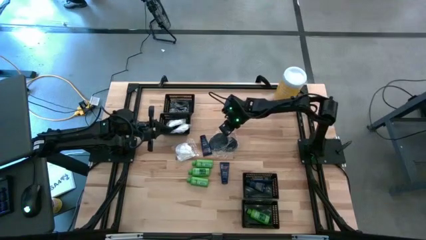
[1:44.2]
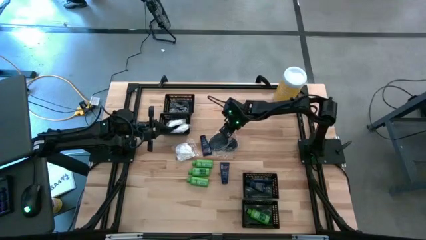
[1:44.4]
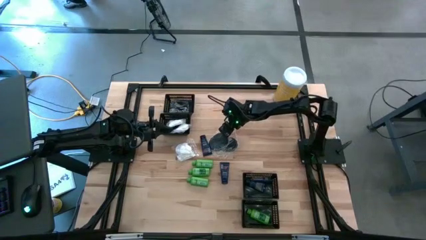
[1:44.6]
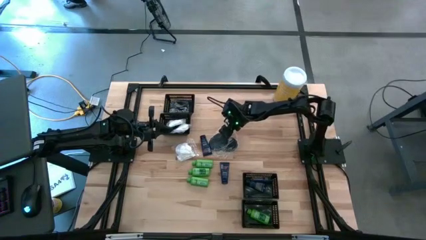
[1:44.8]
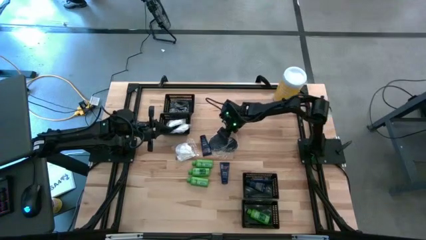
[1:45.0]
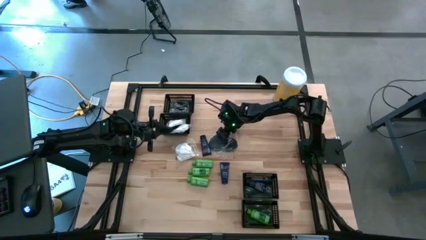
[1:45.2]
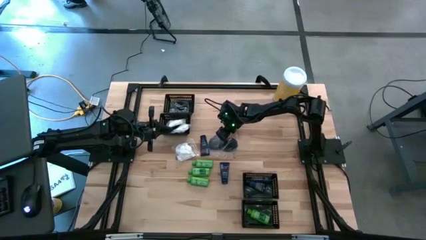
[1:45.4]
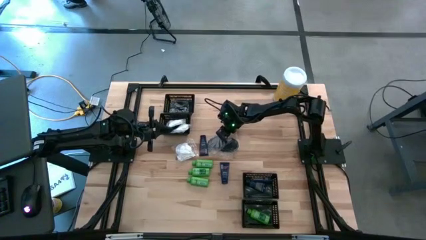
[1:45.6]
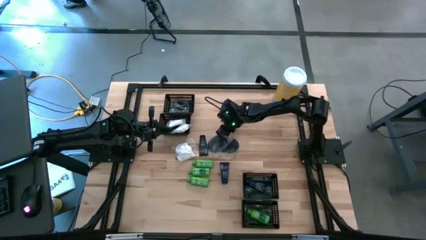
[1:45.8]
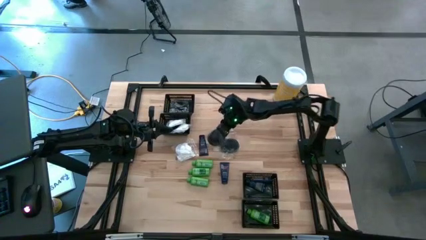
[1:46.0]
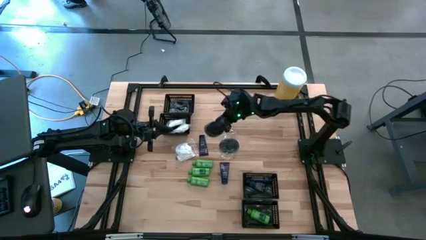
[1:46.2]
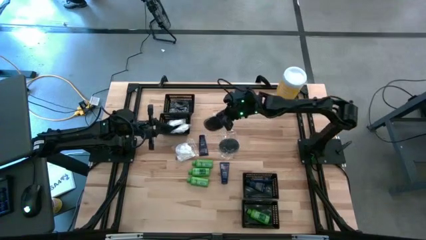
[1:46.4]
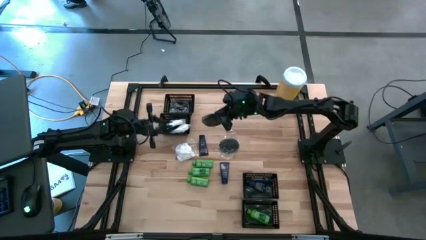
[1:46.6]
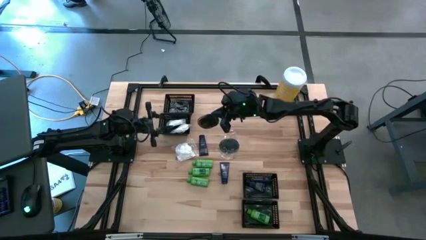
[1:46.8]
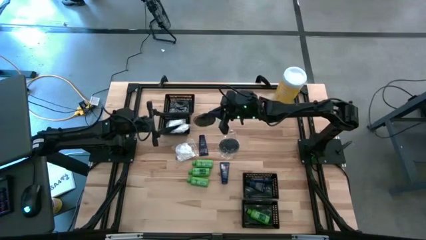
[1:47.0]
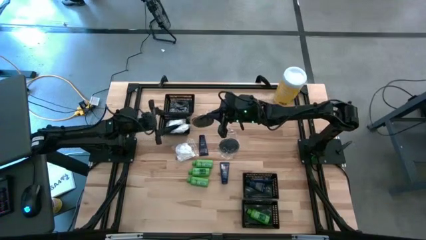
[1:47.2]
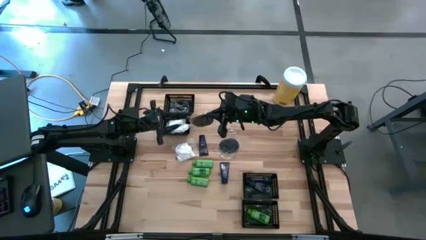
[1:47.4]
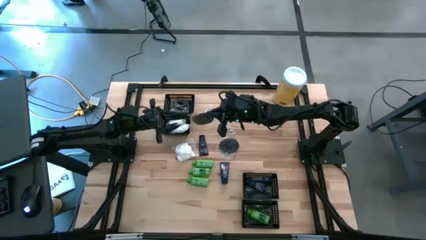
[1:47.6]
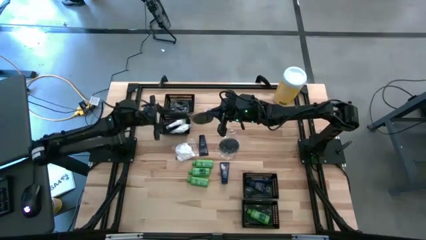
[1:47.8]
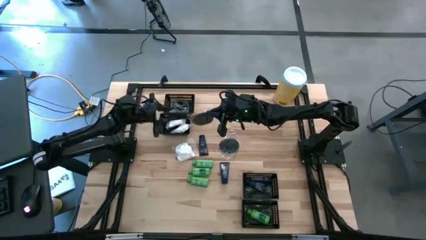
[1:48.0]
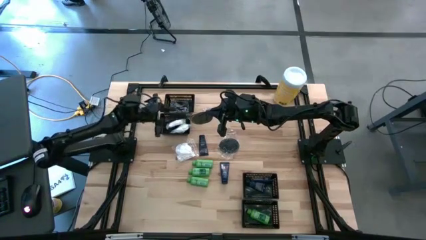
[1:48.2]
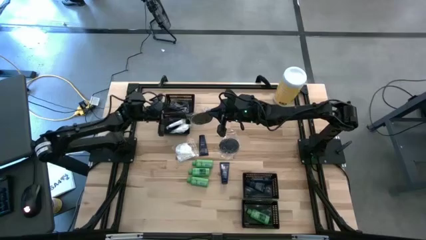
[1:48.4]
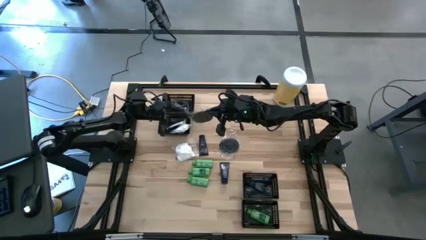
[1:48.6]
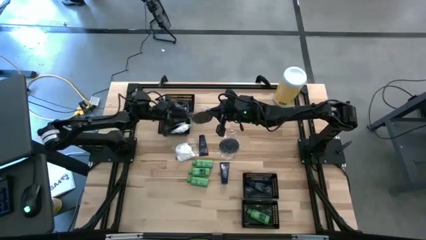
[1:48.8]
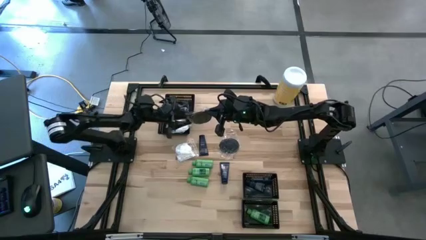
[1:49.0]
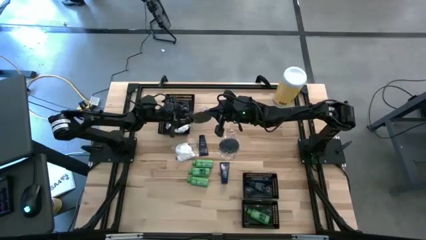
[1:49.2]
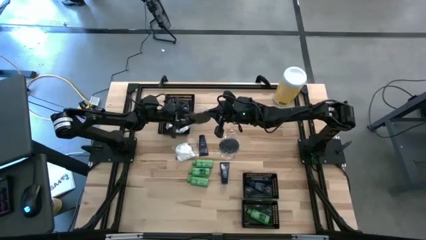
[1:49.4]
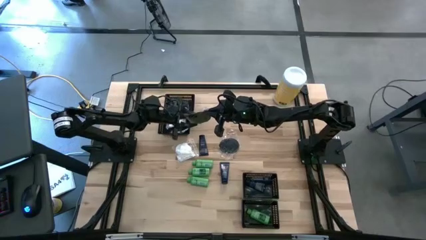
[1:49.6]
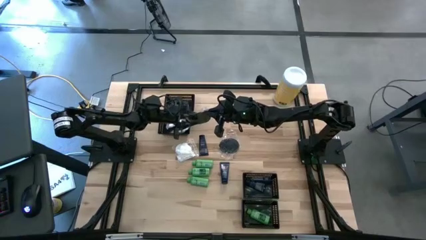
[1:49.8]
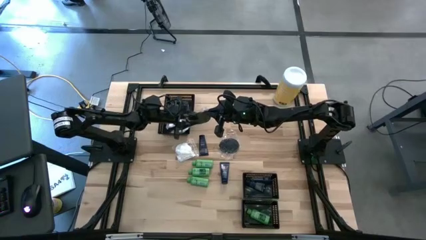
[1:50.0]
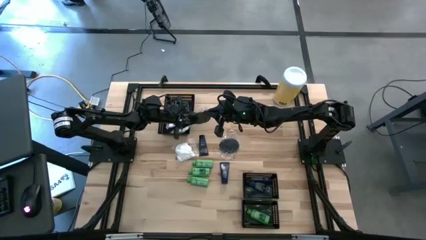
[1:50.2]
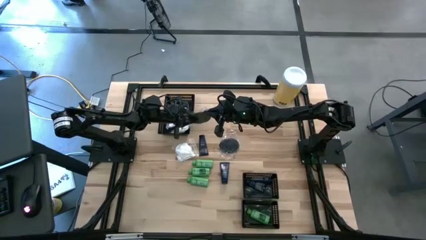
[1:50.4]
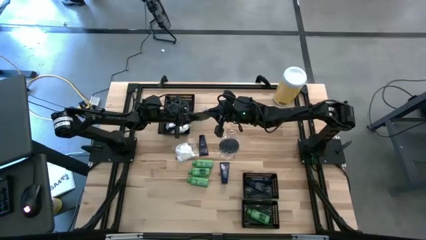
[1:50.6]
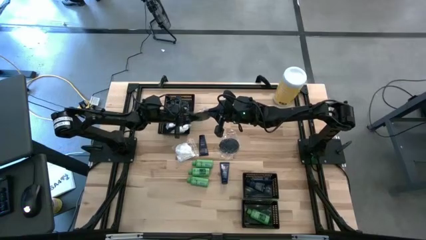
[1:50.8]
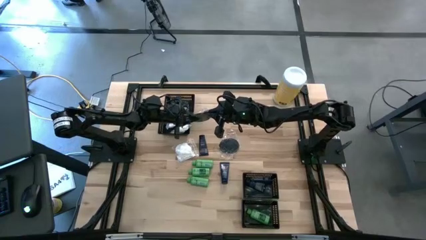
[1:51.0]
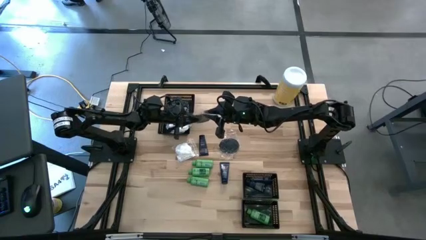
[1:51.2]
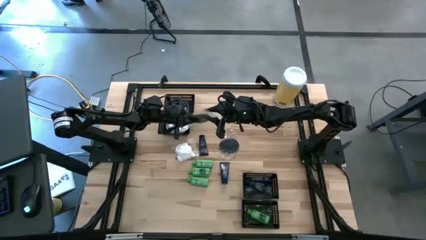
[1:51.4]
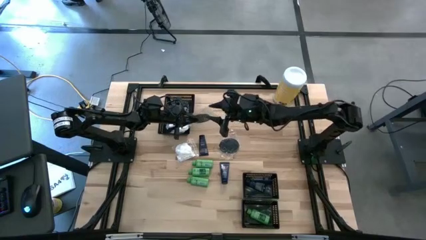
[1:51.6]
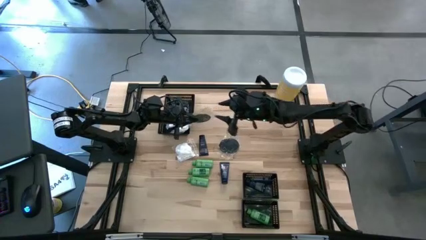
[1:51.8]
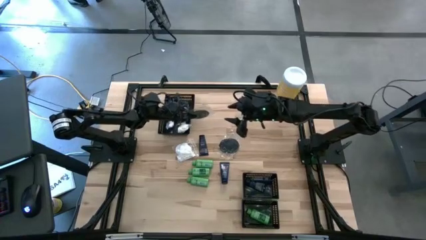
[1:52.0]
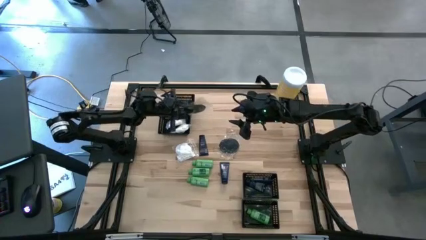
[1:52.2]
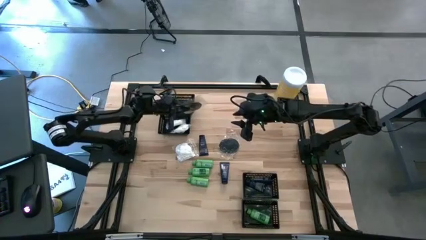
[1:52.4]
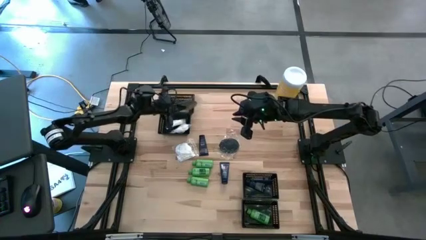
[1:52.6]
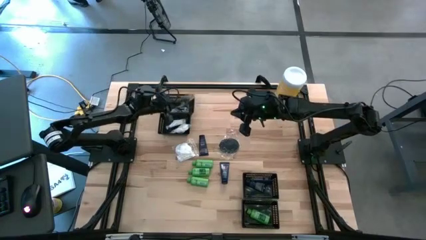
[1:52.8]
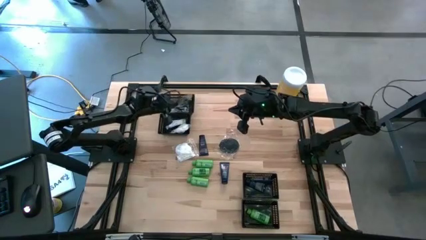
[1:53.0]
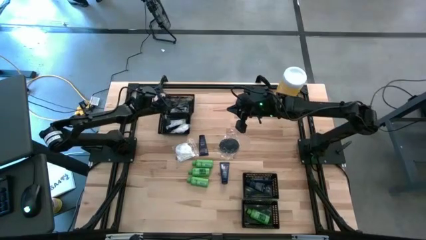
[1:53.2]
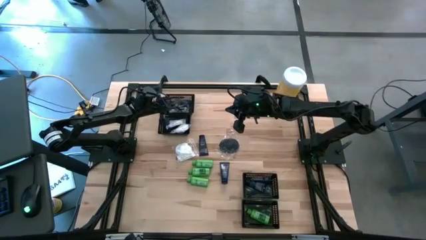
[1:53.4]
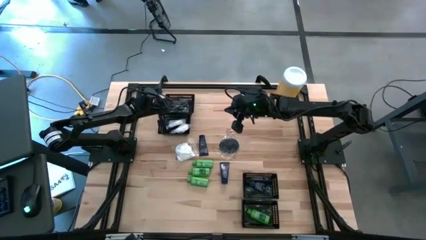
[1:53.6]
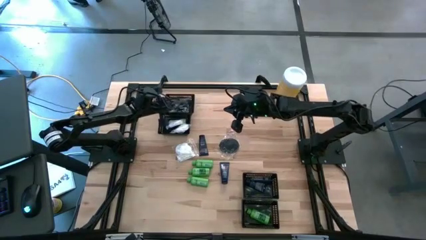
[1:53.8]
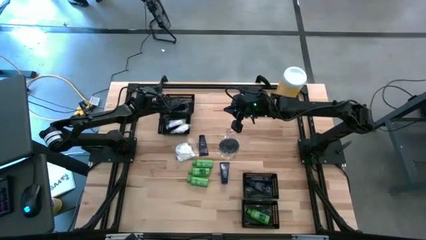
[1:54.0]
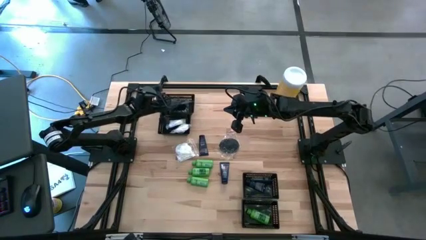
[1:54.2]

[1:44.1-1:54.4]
Task: Pick & Place Travel size toiletries
Put the black hairbrush into the top black basket
